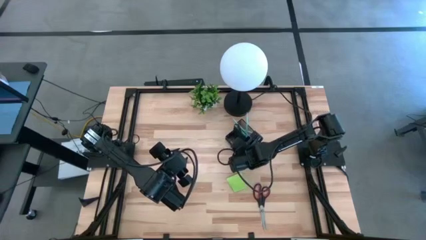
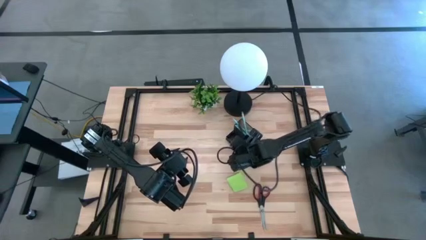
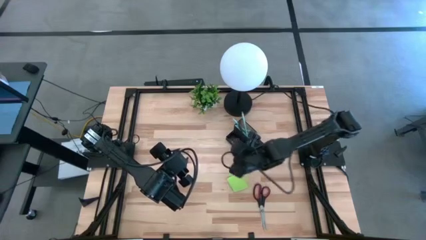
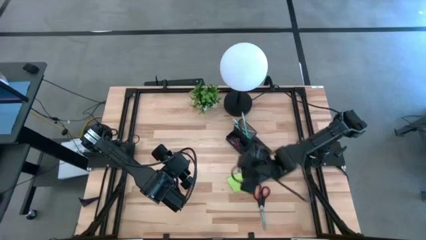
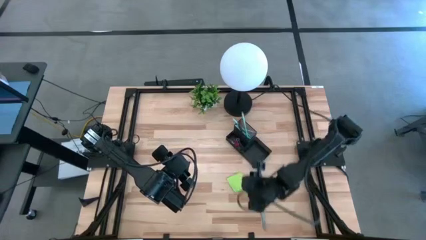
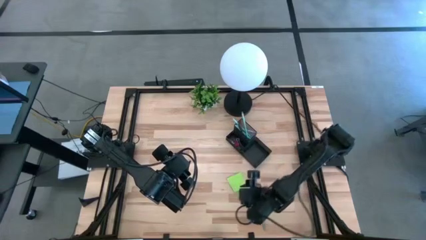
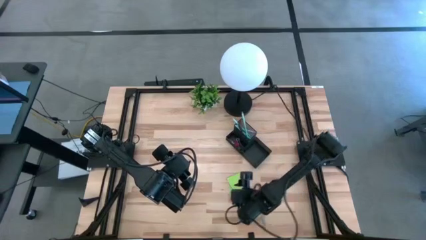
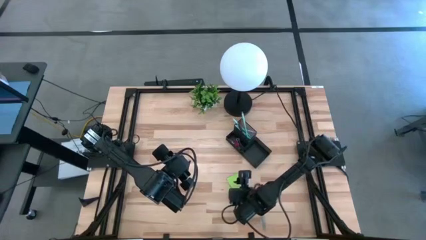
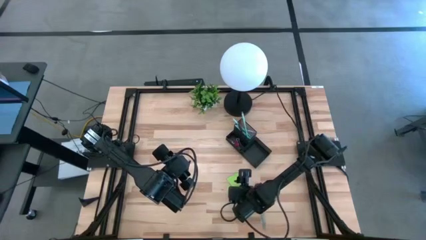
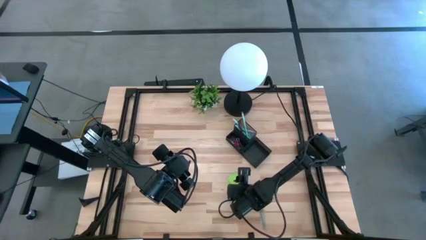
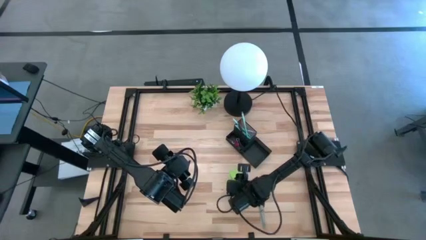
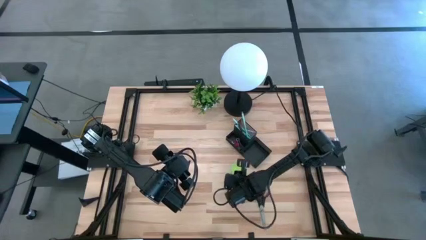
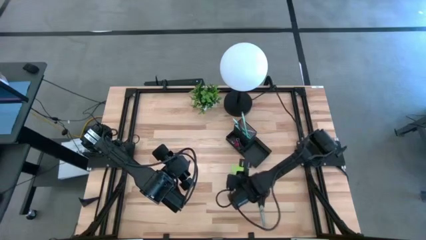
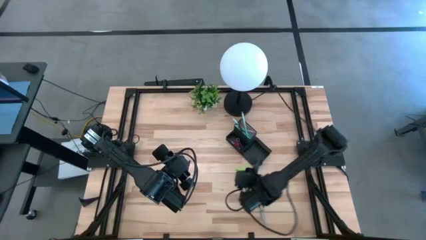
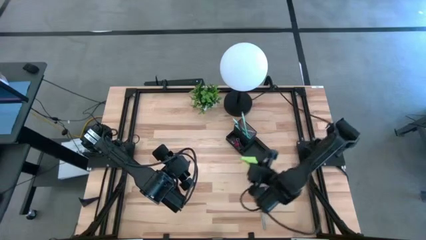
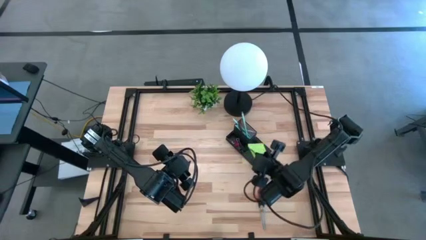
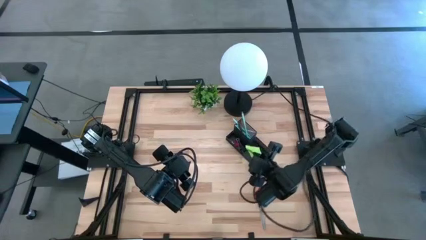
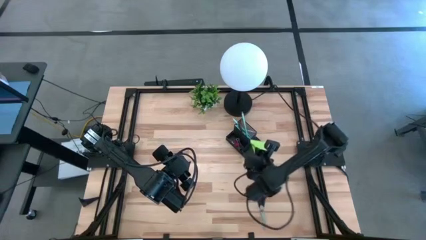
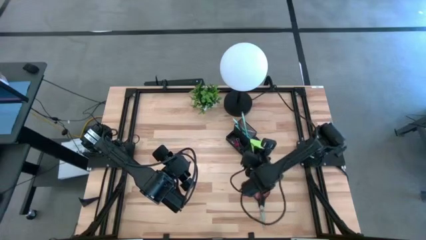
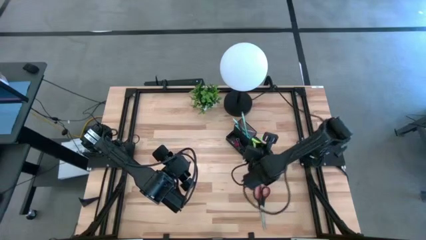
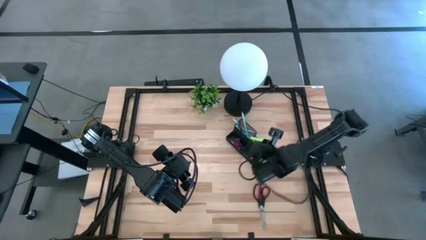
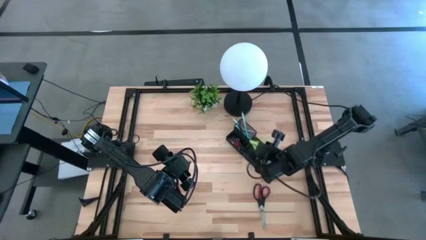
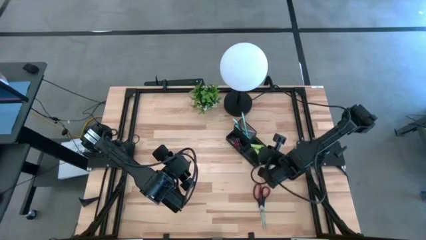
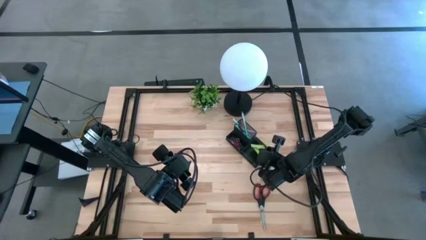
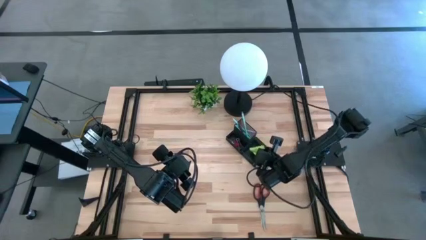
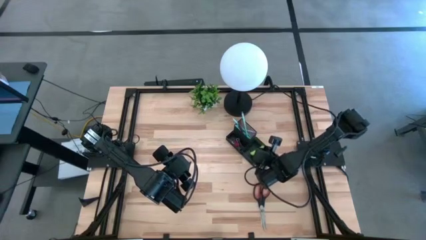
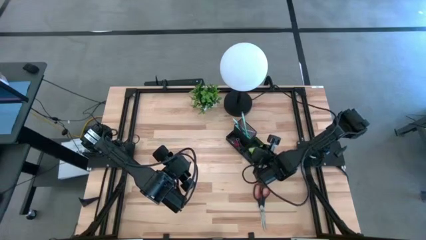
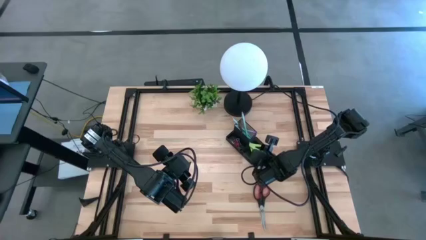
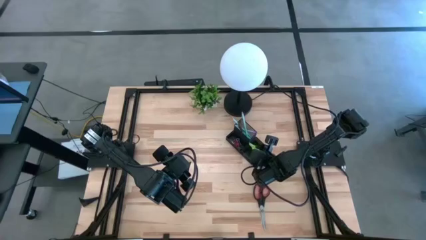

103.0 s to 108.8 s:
Task: Pick and place office supplies into organizer
Put the green sticky notes into the desk organizer

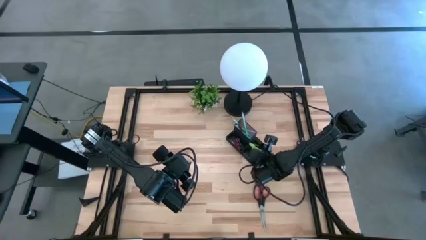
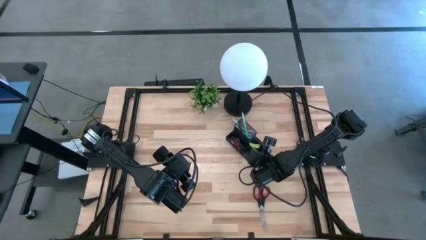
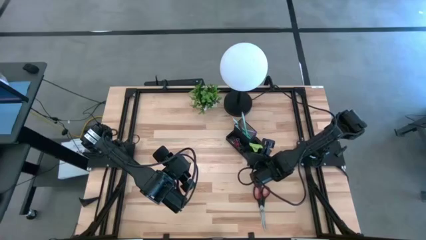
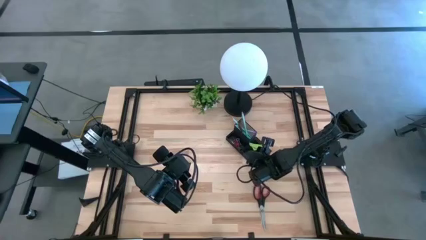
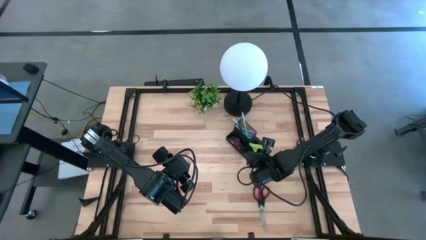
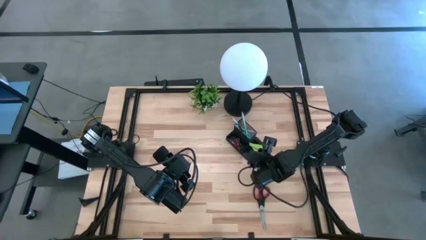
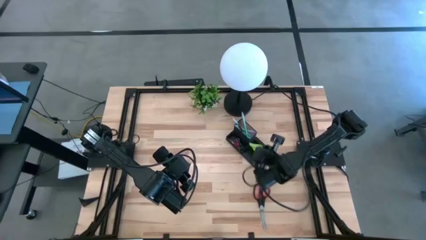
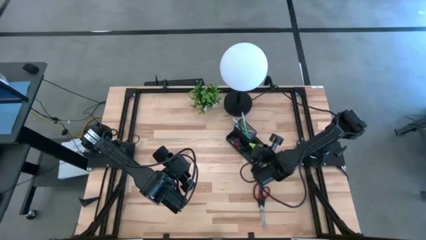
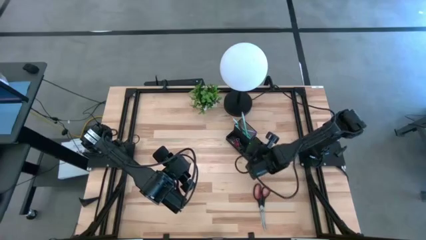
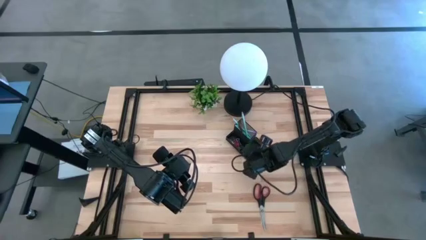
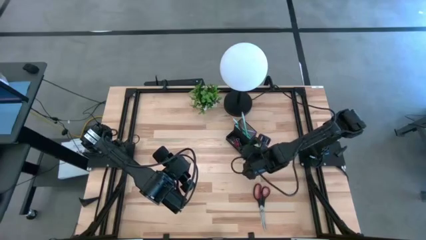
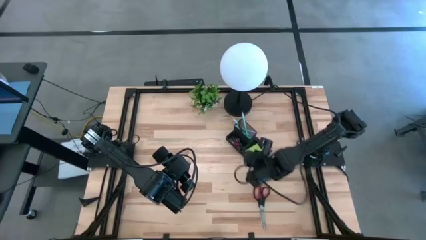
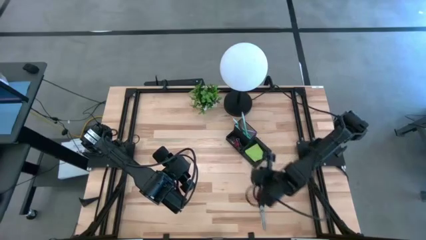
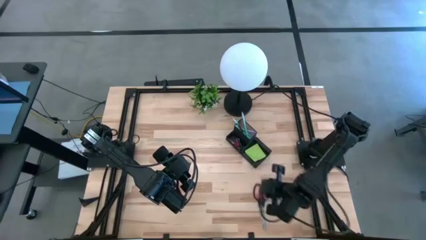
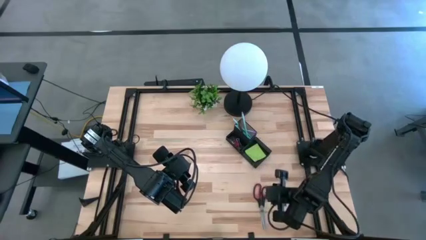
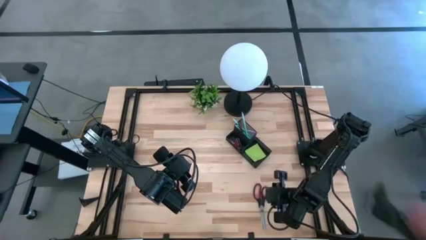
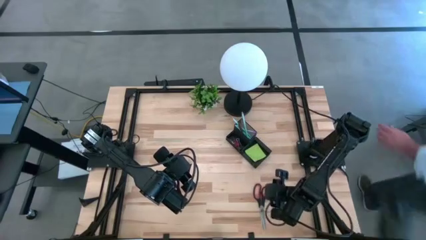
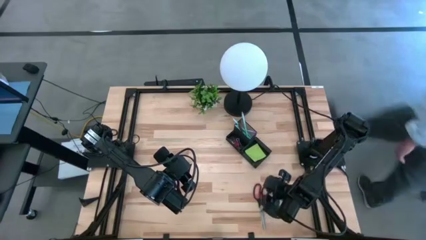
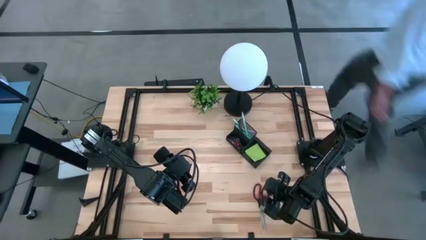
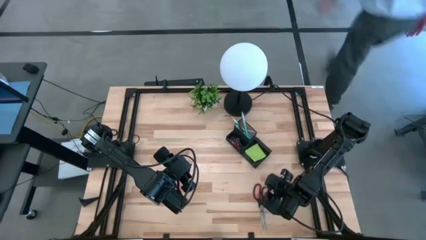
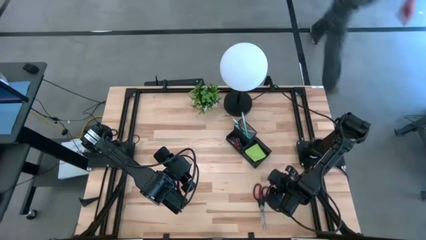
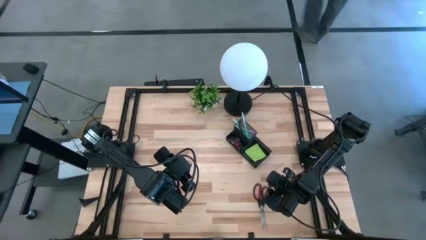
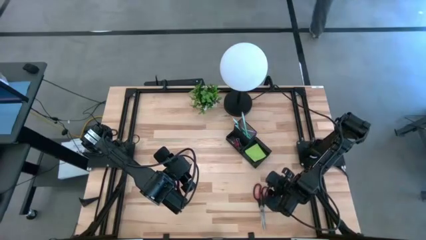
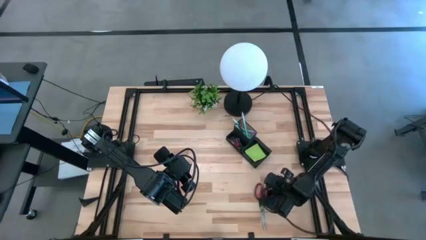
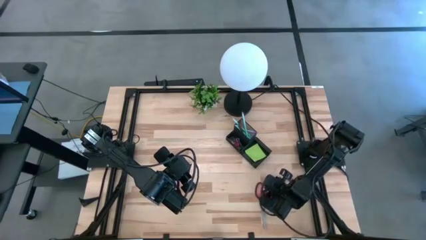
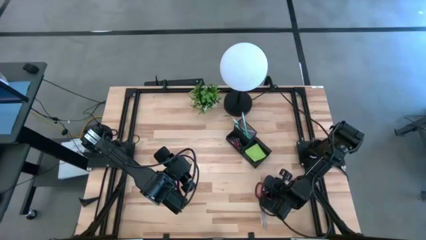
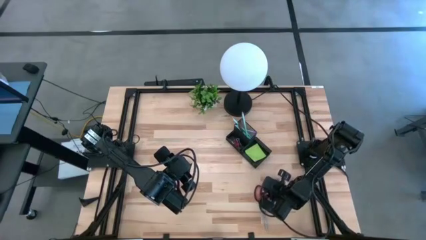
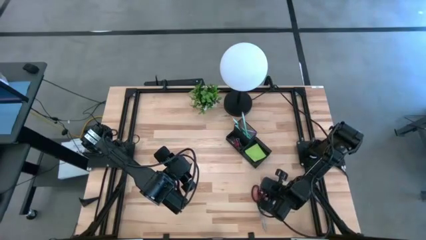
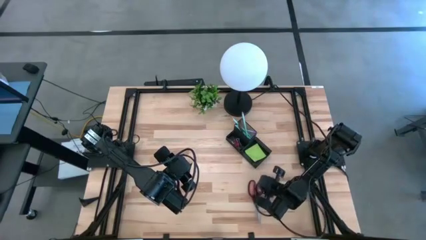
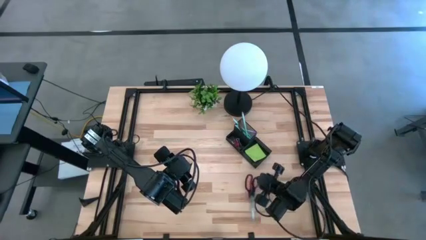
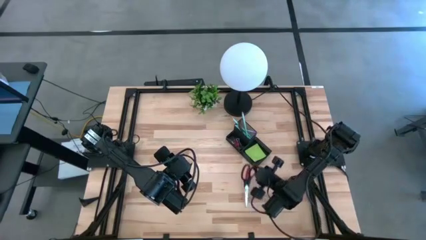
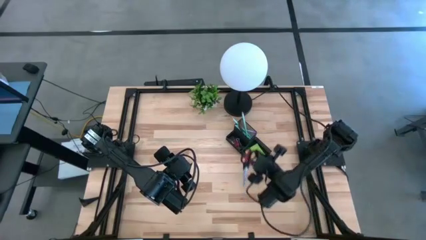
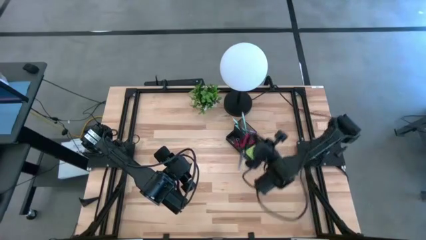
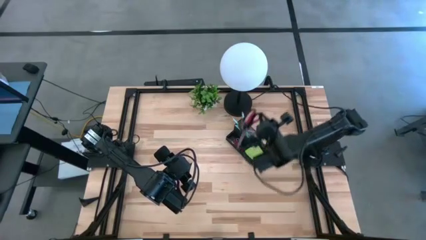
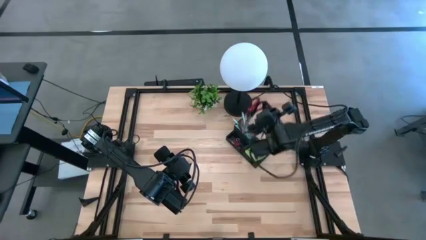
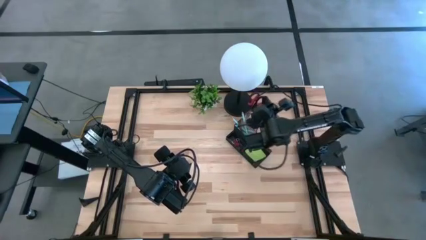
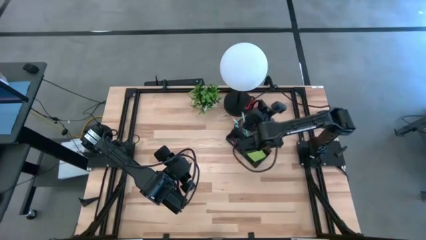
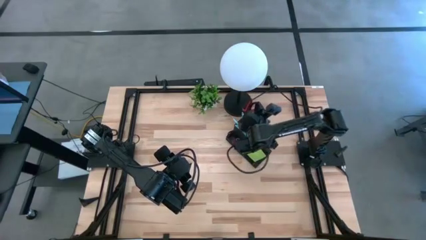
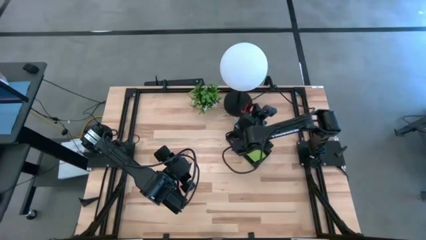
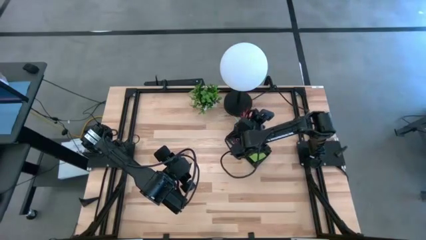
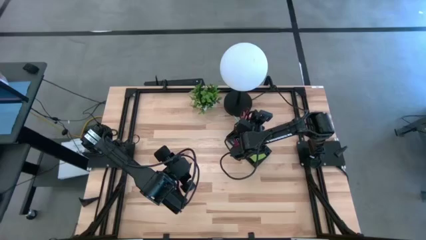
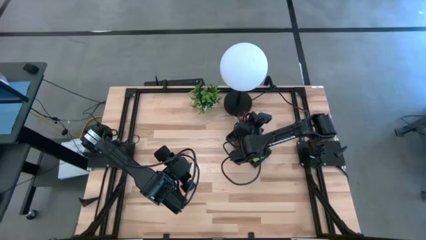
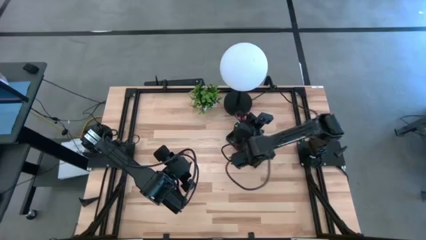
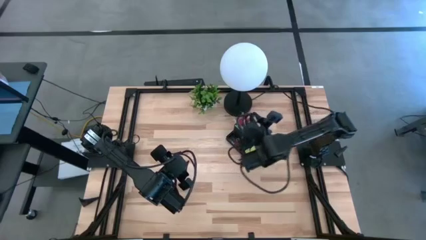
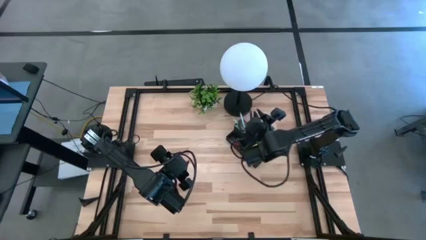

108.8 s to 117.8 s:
Put the black scissors into the desk organizer with the other pens and pencils
